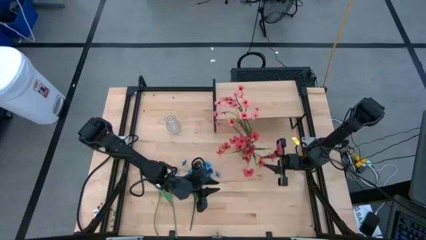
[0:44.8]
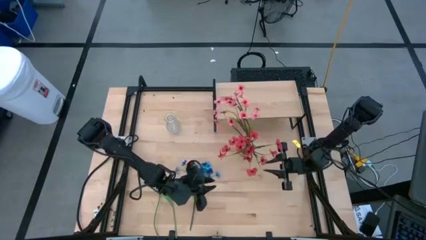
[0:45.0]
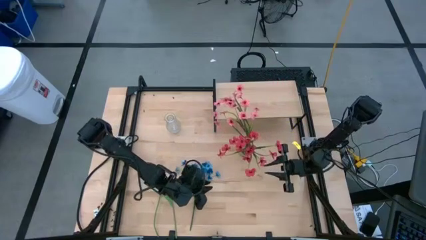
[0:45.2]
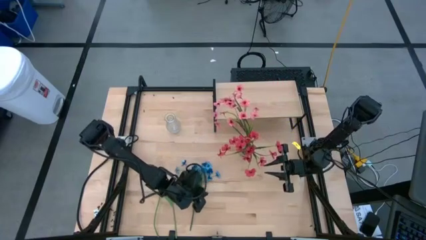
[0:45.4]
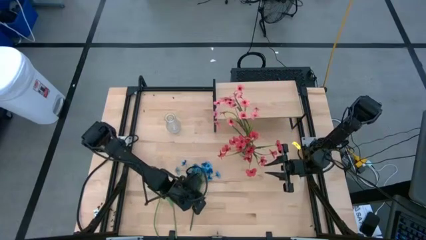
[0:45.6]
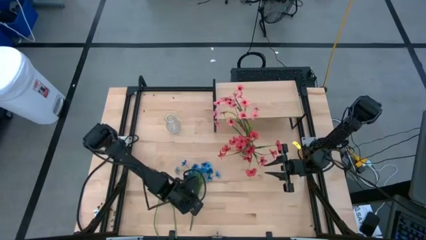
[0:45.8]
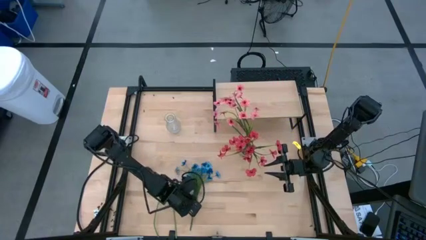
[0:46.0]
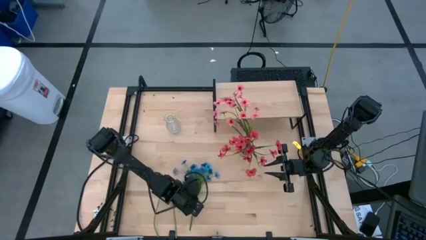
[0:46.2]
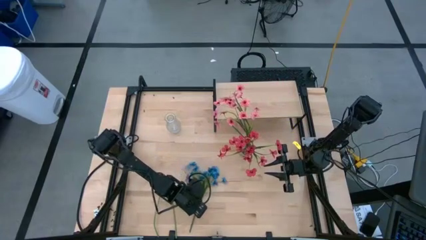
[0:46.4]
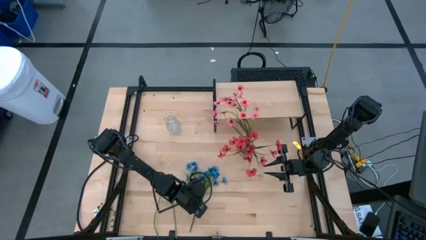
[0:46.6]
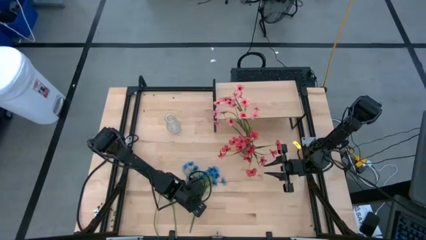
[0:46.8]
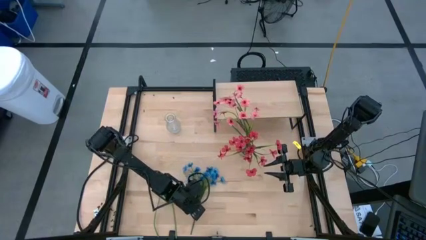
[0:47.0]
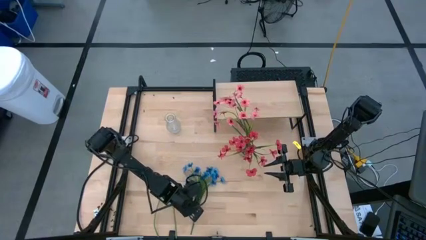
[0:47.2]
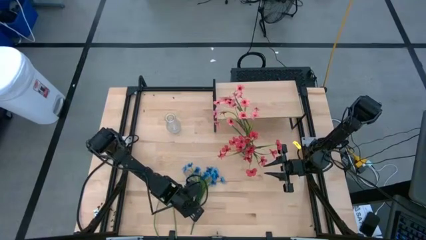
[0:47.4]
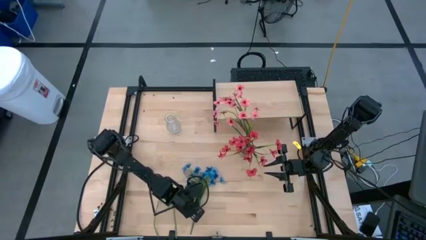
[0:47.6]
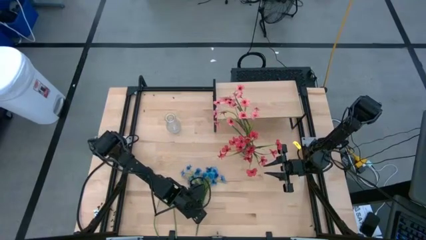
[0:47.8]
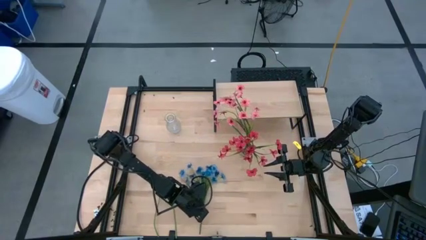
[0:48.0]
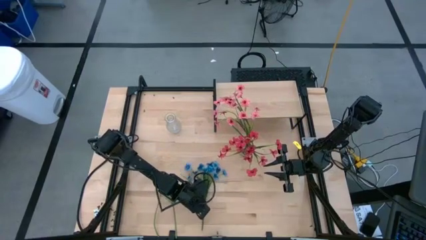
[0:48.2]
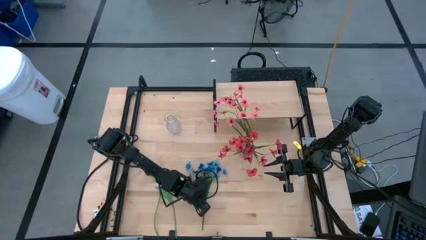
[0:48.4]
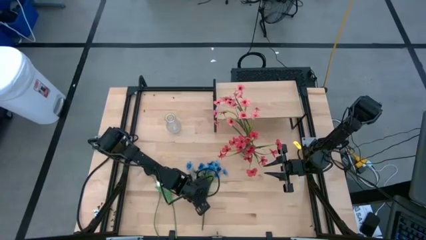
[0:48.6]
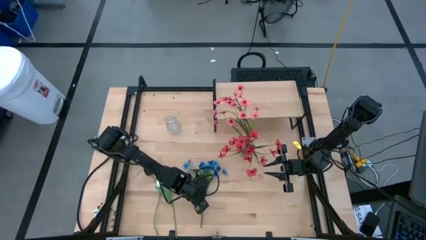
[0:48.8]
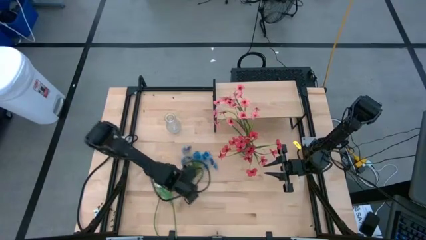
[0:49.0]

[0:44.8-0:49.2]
Task: Pick and place flowers into a vace then onto a shelf
Put the blue flowers into the left transparent vase

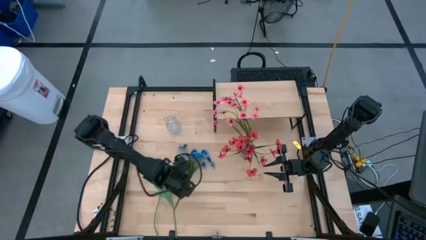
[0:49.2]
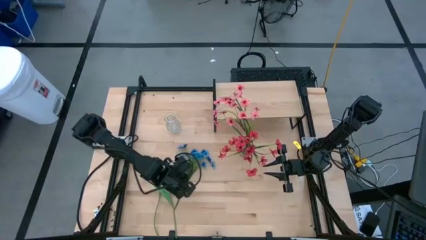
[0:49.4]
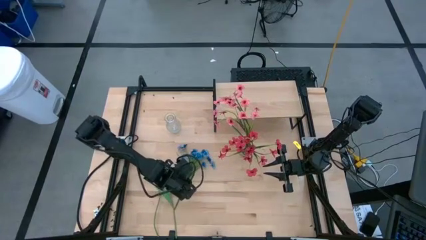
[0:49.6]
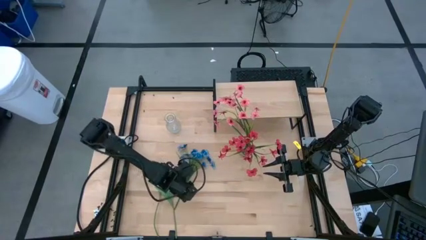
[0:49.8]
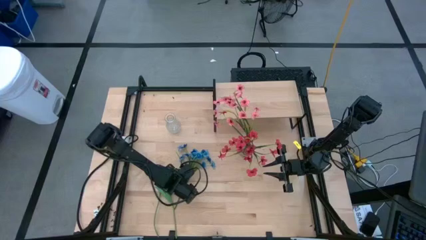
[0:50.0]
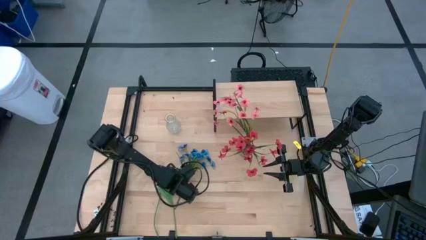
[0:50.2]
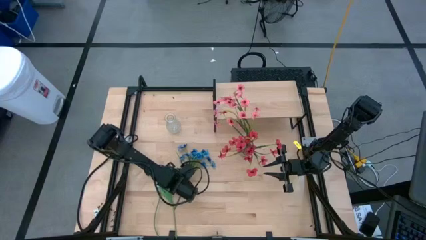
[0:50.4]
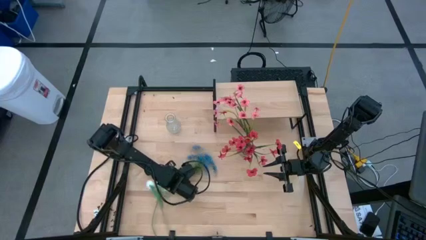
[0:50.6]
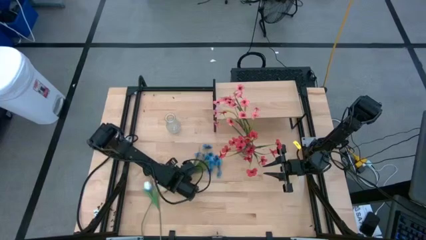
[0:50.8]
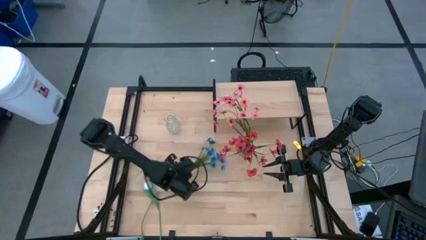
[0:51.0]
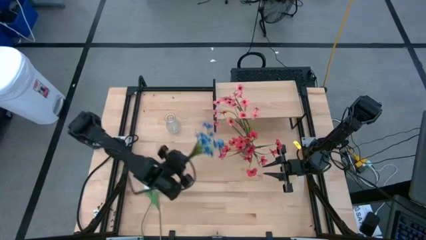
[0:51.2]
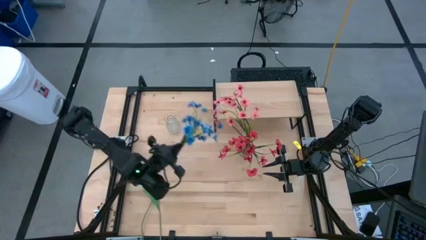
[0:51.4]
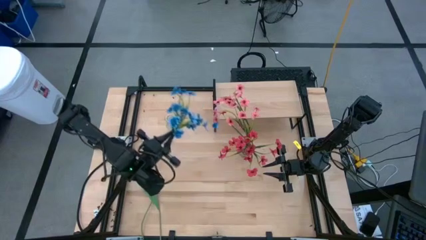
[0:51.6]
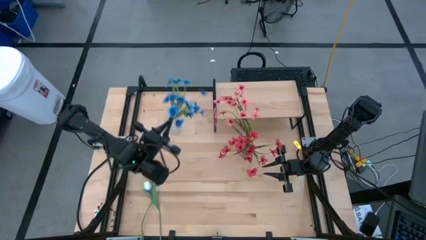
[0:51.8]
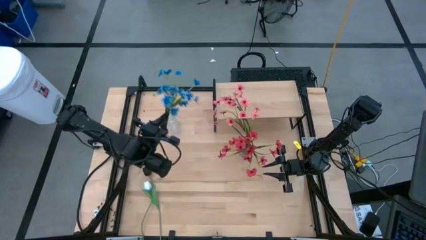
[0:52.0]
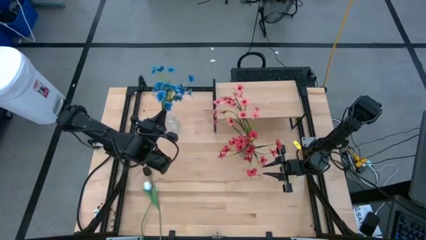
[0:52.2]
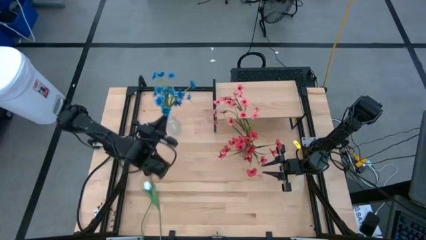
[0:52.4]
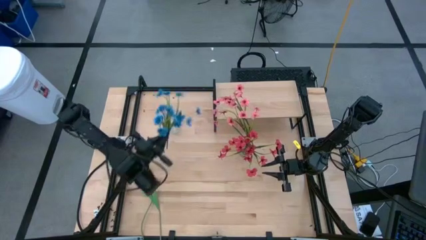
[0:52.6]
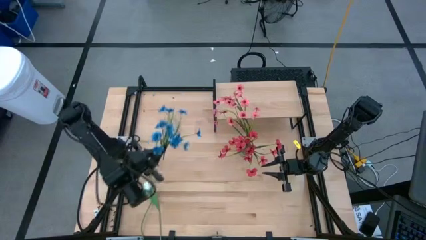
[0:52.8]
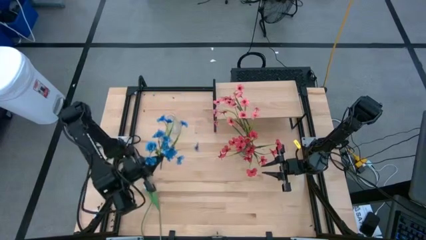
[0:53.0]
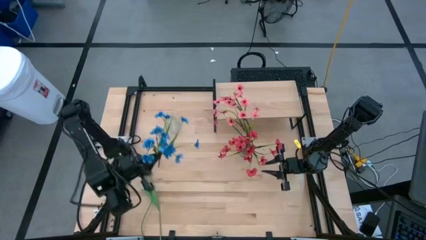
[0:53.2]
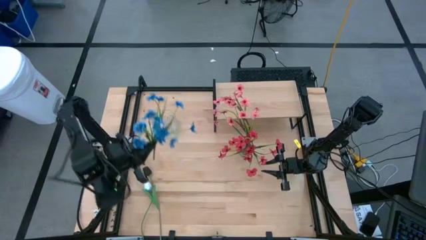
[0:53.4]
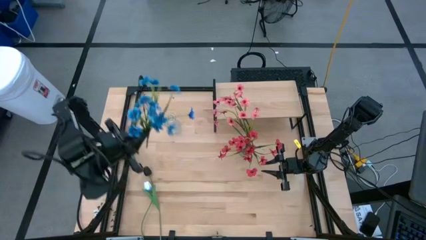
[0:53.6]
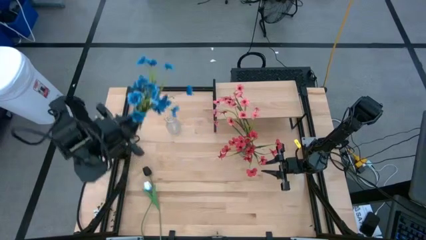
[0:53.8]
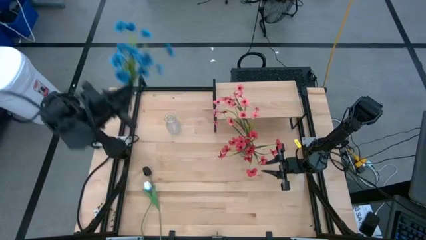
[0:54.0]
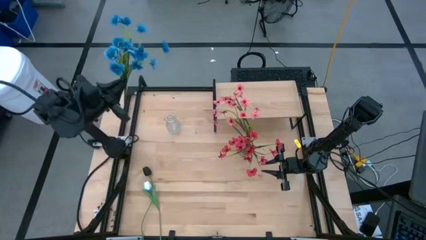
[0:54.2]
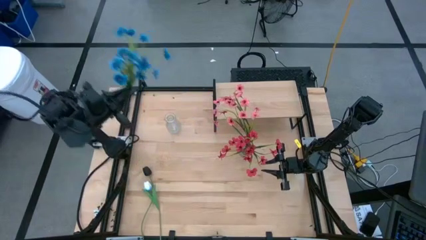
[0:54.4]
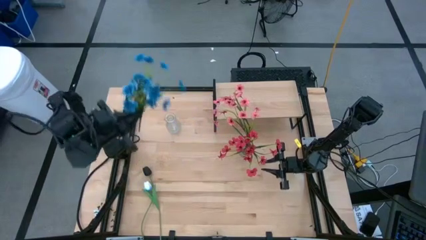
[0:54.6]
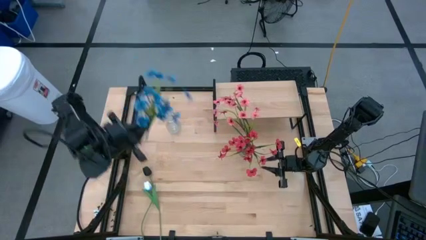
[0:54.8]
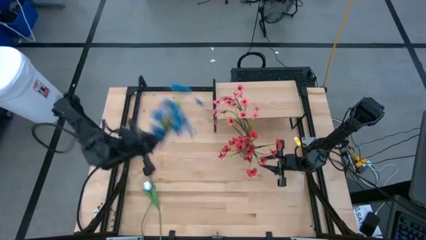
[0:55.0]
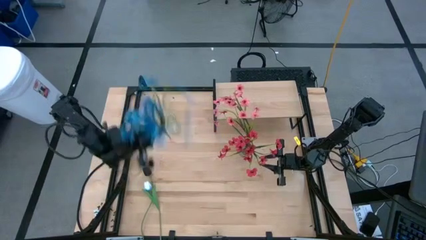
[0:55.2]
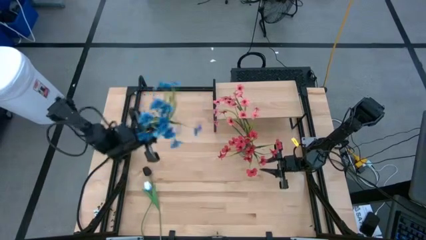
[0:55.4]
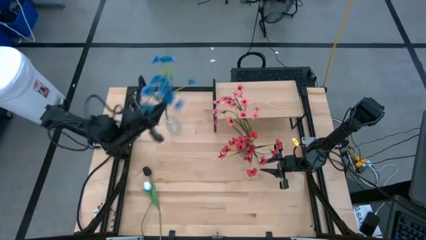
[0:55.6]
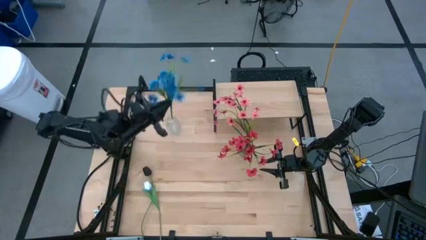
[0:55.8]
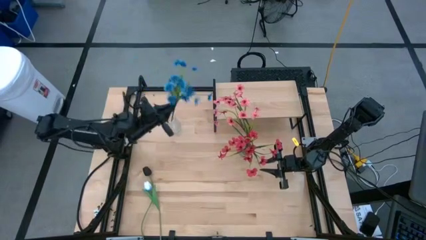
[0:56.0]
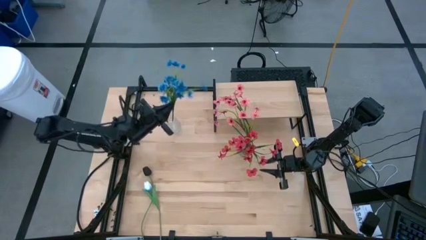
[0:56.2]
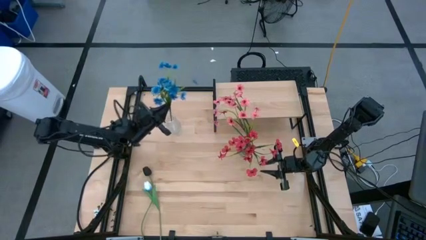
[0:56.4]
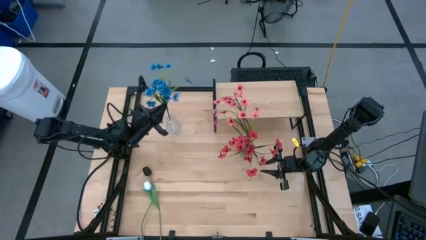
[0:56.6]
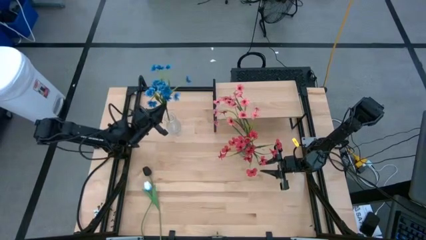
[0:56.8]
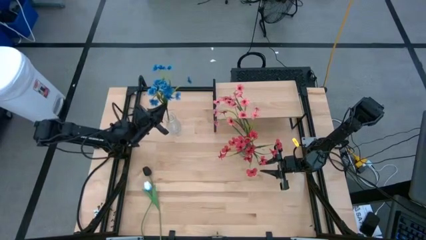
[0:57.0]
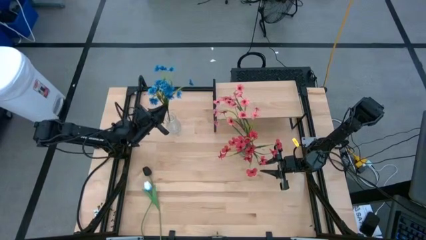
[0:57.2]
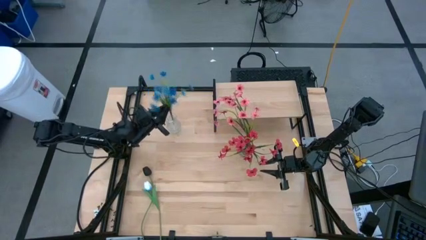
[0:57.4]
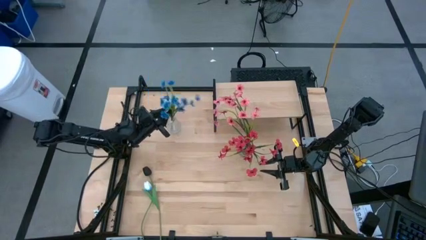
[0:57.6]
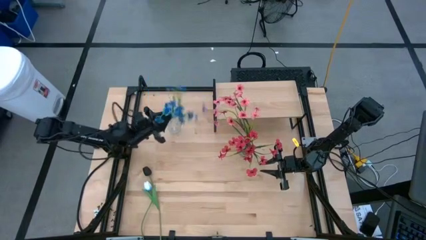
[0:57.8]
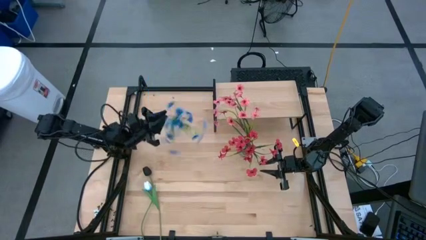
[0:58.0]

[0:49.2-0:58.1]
Put the blue flowers into the left transparent vase

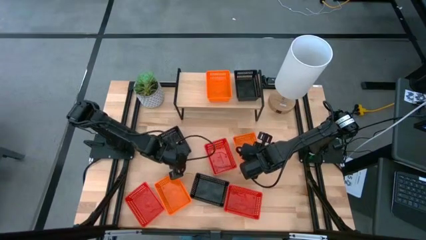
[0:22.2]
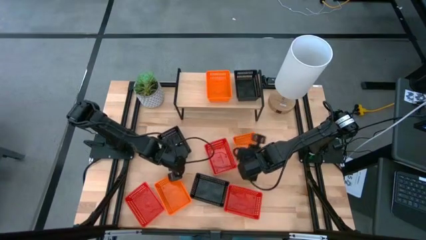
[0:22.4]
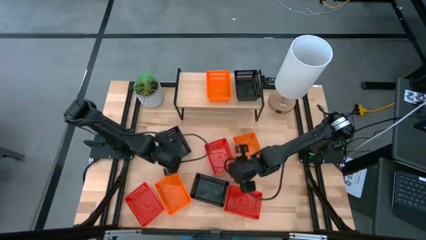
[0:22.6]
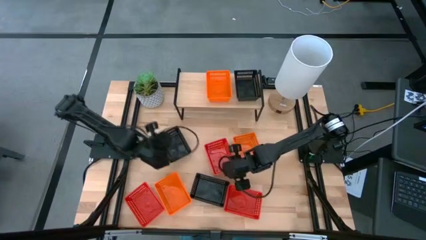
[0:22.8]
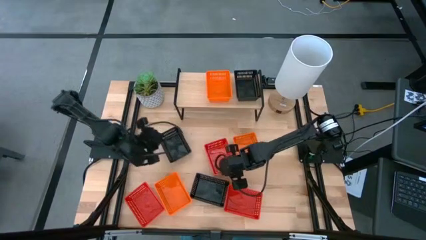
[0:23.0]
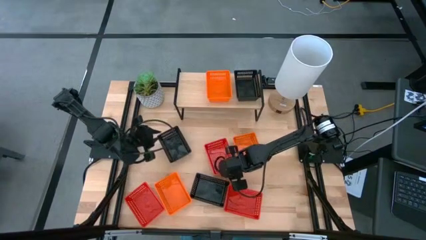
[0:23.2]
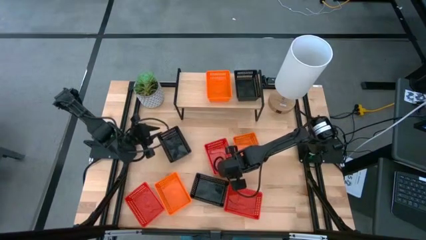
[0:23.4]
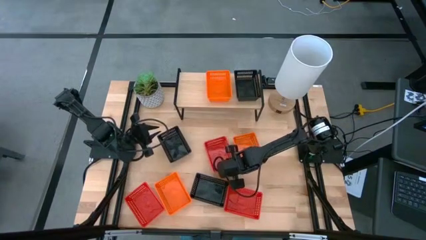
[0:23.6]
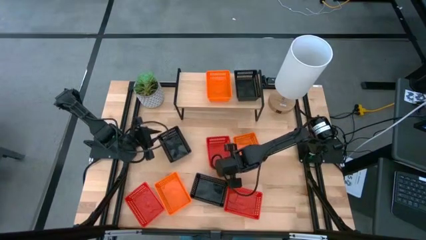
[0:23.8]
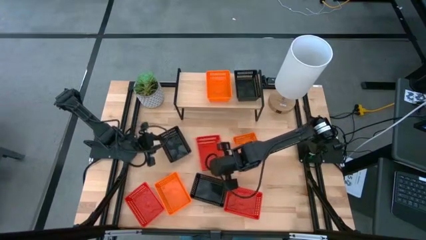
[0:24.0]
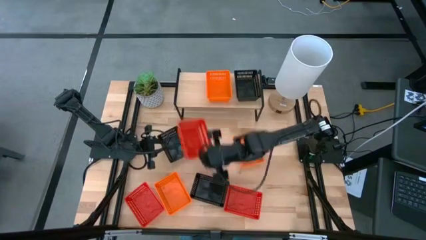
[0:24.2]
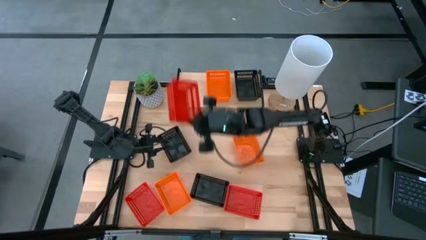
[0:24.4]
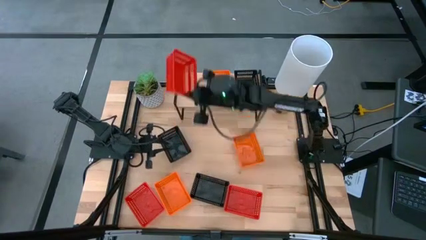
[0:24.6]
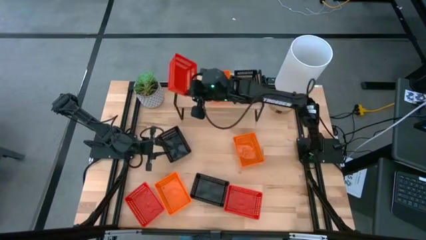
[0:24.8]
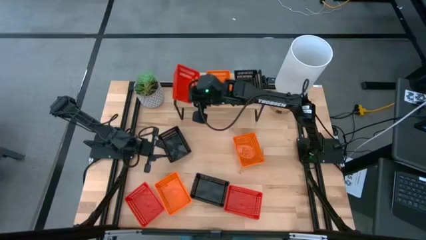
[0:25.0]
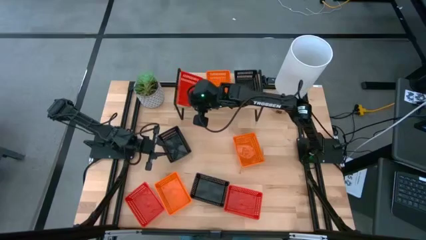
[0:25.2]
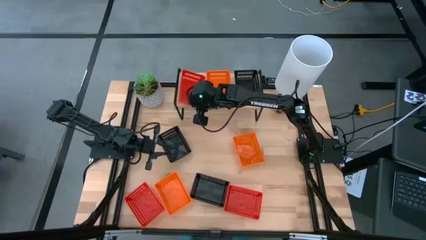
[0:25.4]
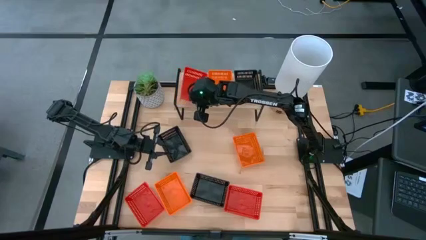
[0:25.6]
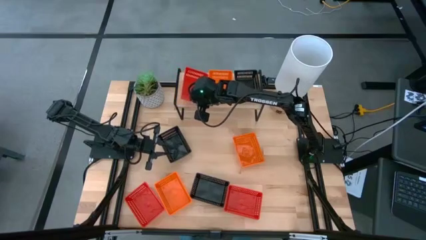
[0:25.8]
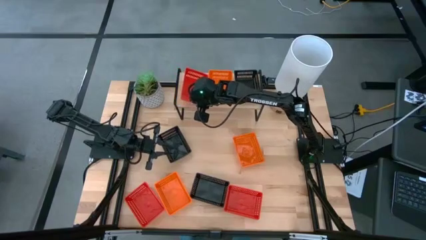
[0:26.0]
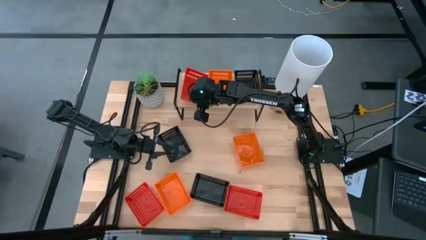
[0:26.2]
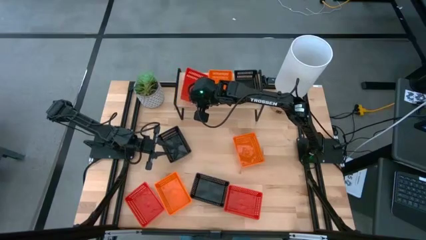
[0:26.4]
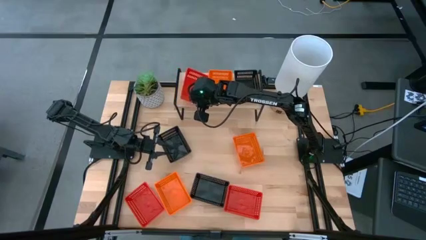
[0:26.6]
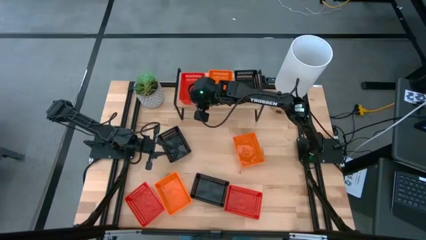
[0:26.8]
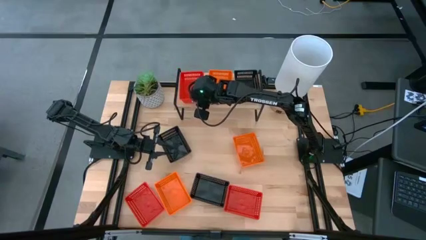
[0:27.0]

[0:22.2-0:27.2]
Task: Stack baskets on shelf by color
Put the top red basket on the shelf
